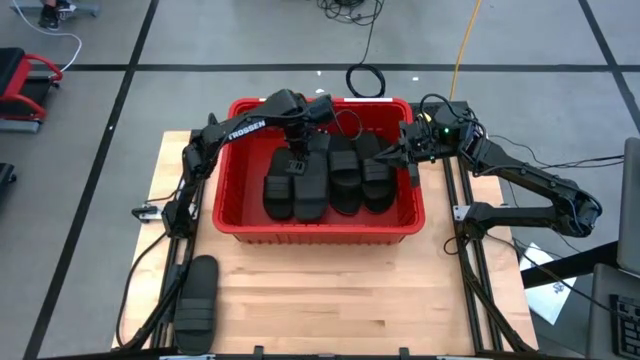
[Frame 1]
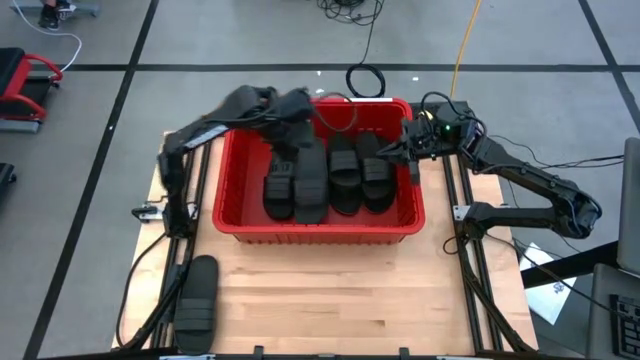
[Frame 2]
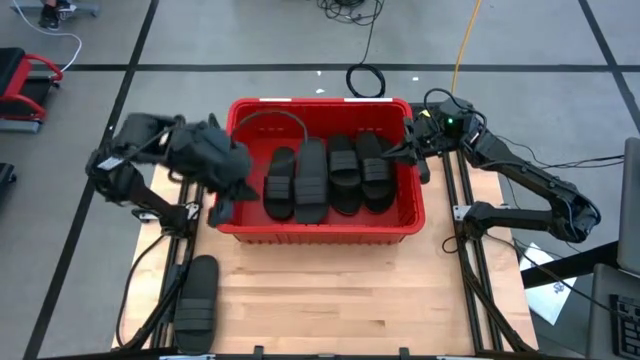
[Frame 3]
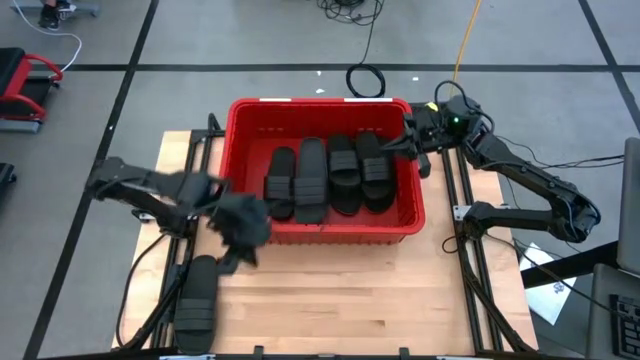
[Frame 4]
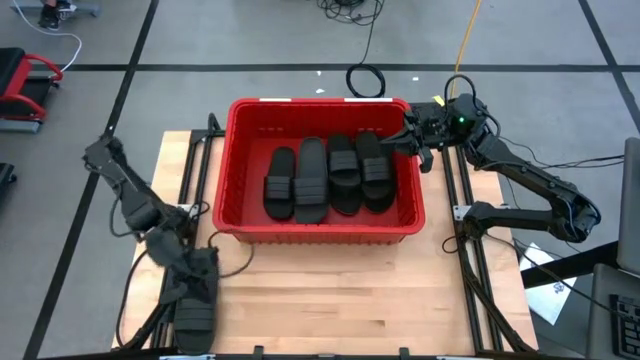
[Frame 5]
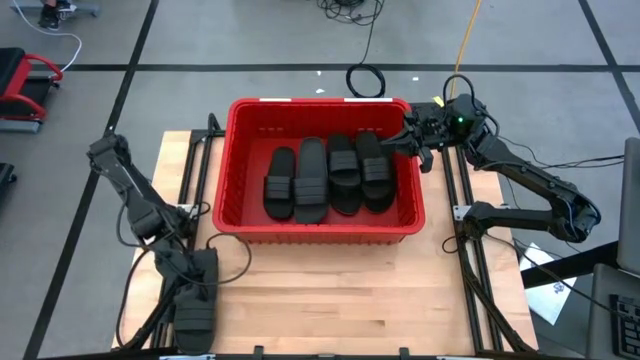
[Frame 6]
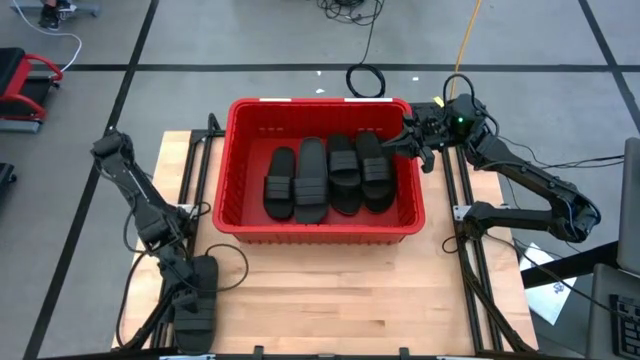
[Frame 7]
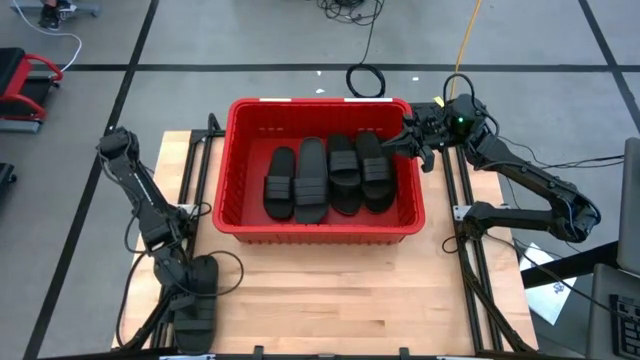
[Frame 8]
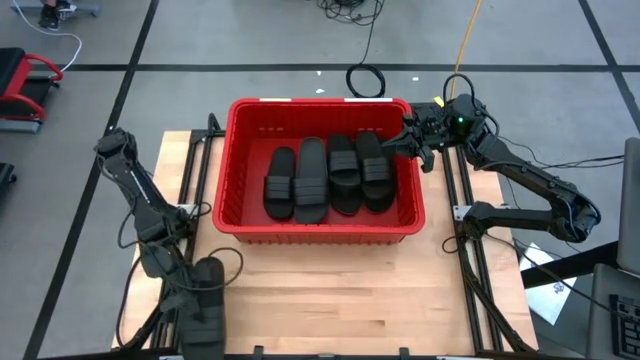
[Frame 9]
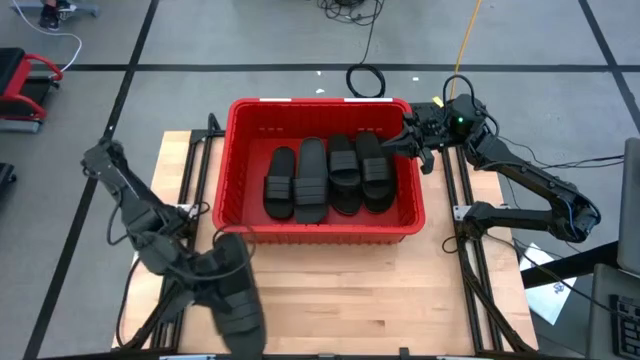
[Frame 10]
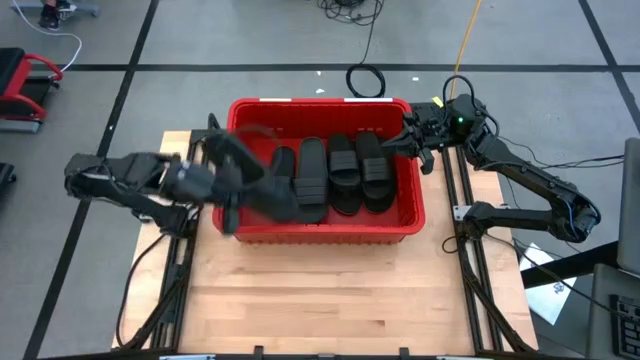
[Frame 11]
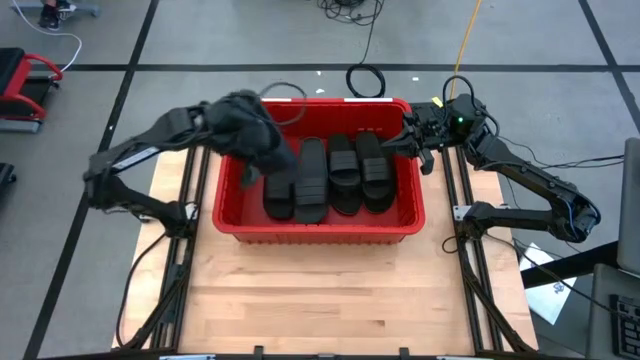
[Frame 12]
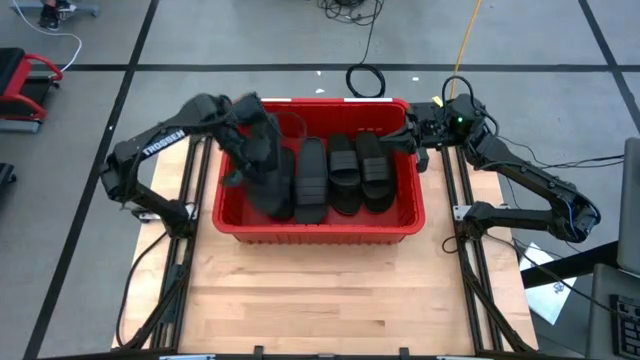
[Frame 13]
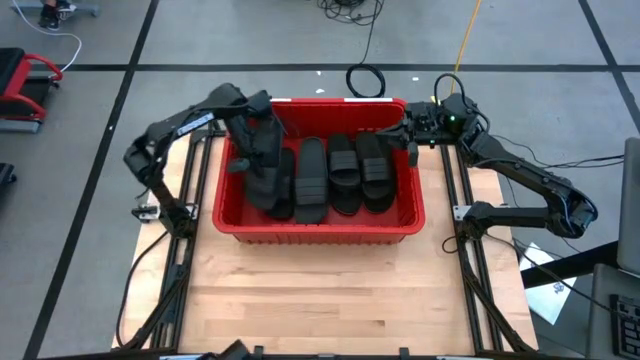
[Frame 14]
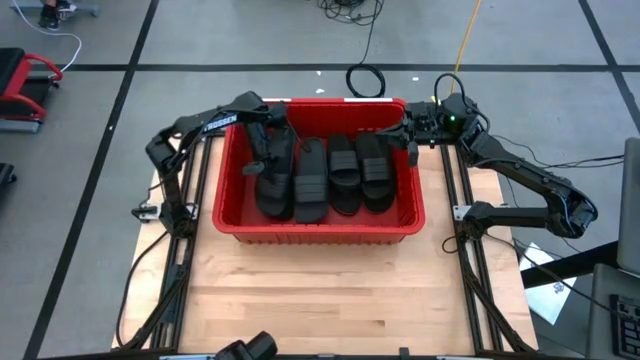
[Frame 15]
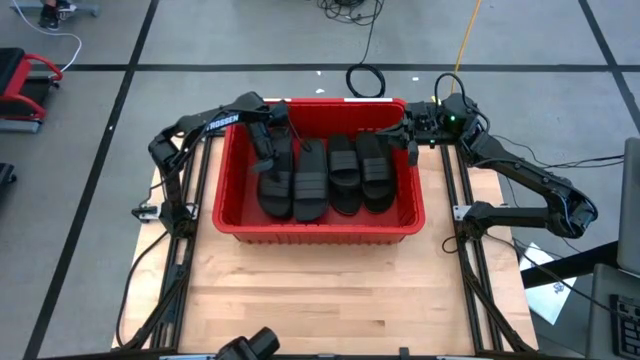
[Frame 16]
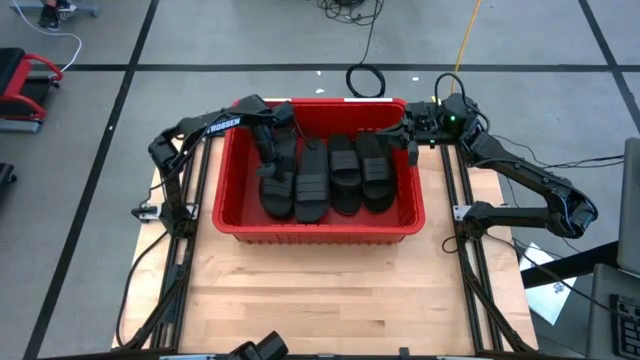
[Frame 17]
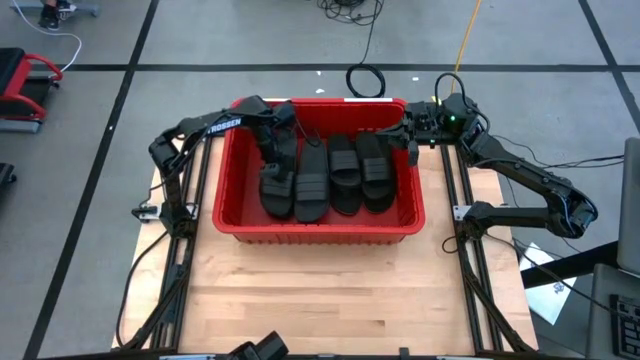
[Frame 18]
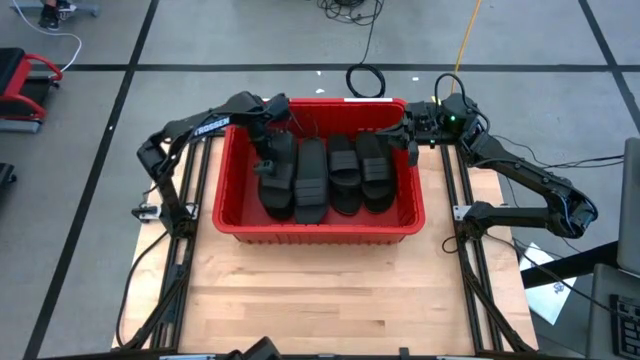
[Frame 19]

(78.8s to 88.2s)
Task: Pick and place slides into bin
Put the slide into the red bin

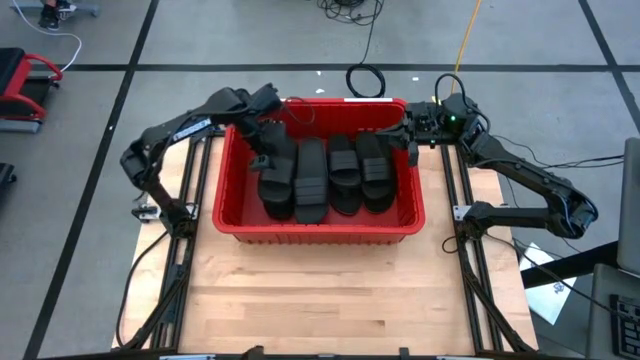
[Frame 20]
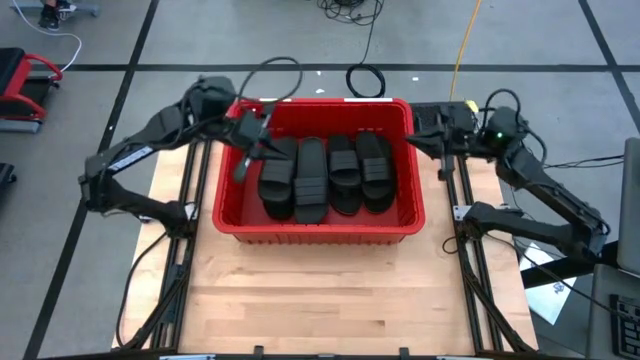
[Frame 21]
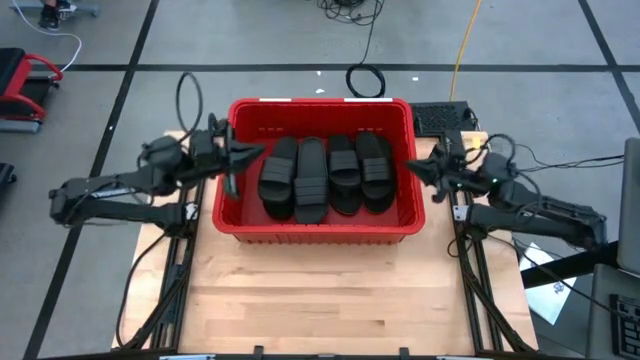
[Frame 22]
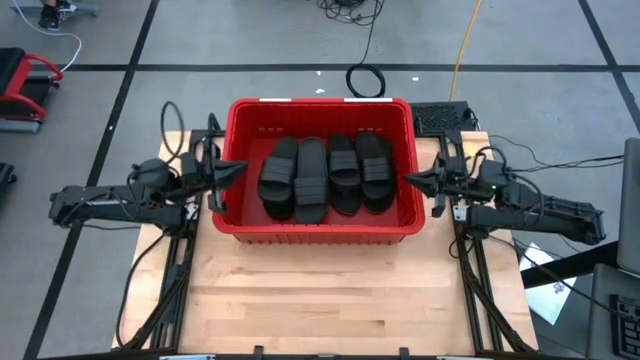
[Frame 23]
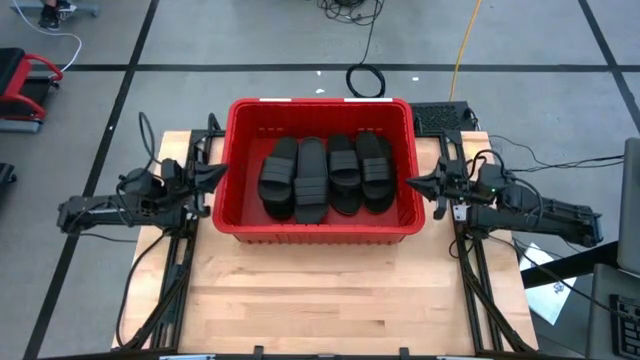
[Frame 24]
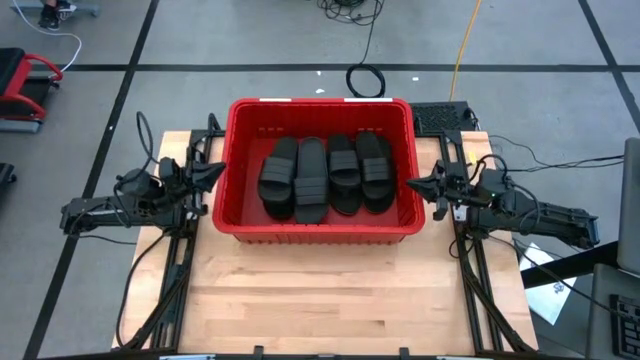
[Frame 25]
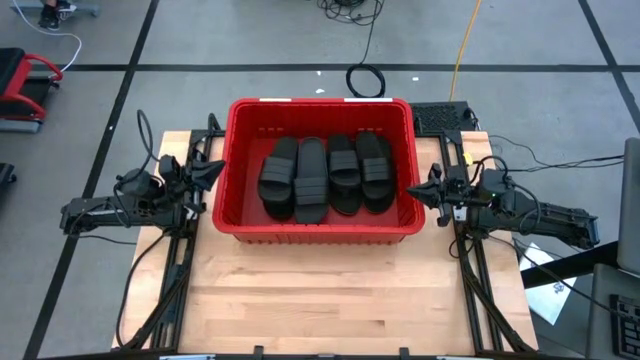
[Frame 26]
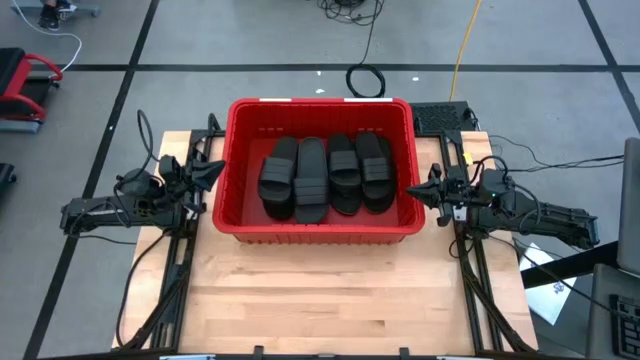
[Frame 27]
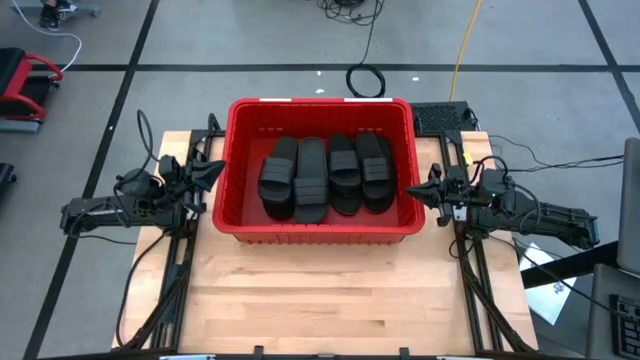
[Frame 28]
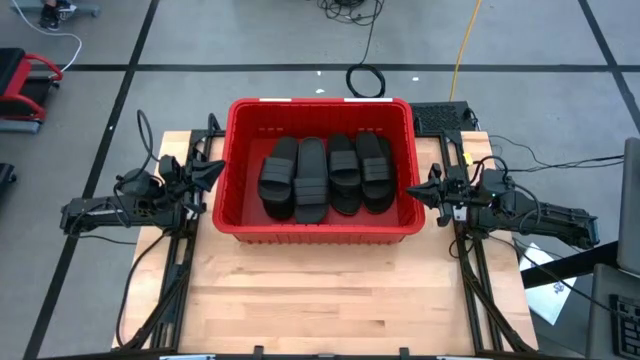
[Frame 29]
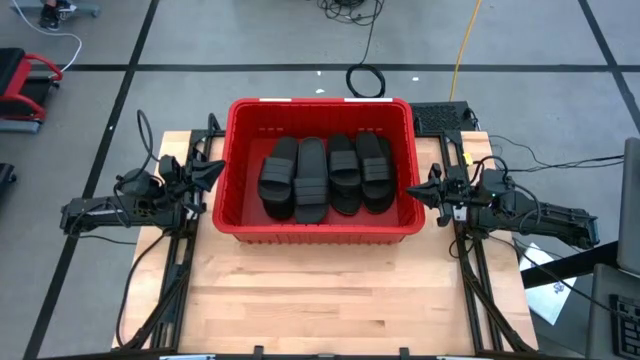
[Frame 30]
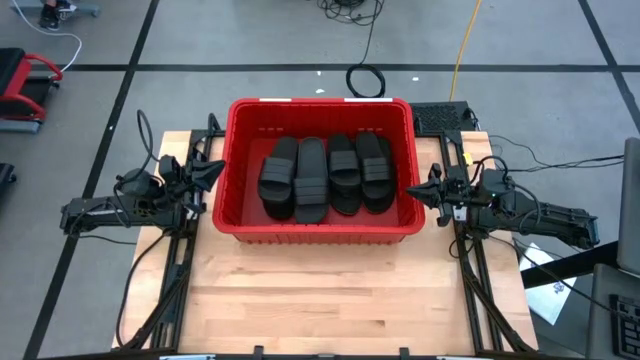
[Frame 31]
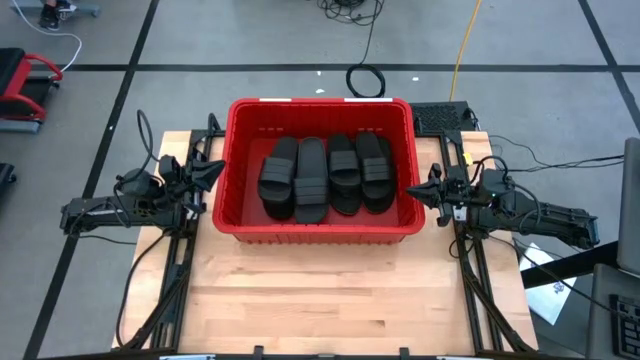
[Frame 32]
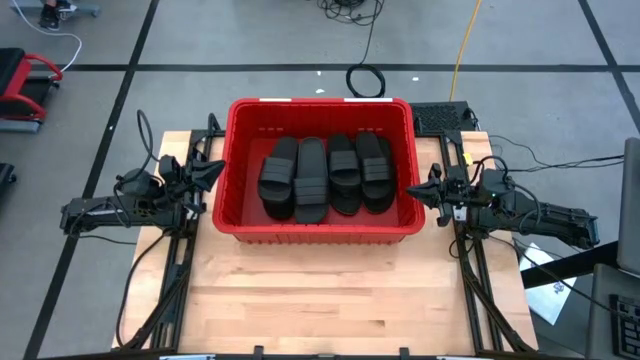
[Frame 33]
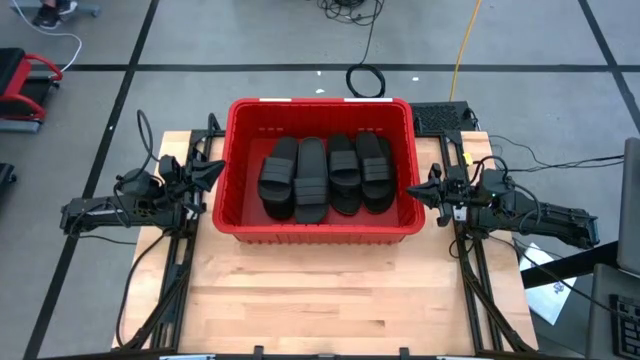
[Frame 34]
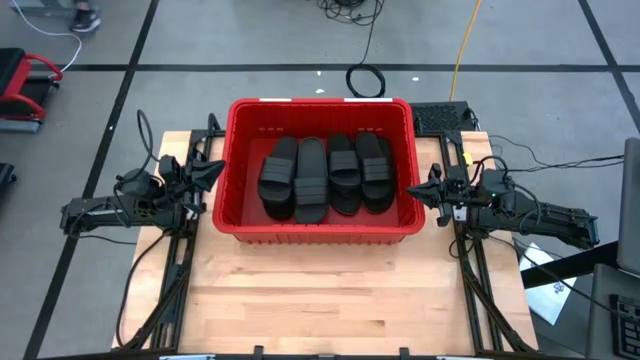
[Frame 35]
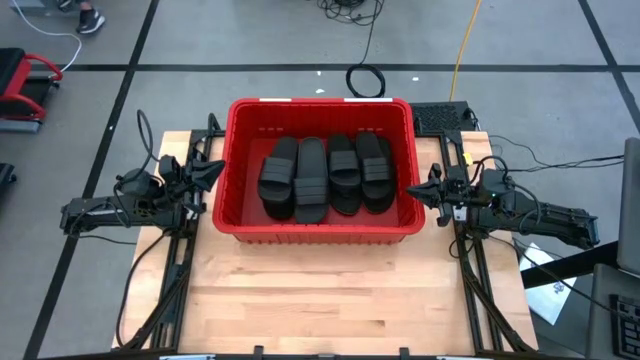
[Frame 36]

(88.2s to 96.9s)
Return to Home Position

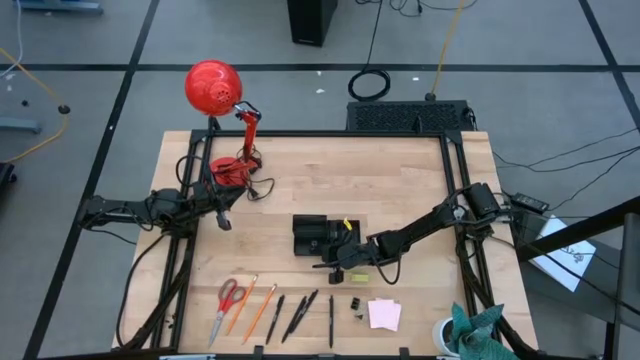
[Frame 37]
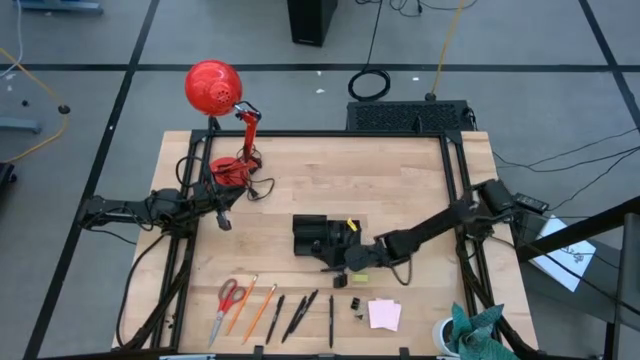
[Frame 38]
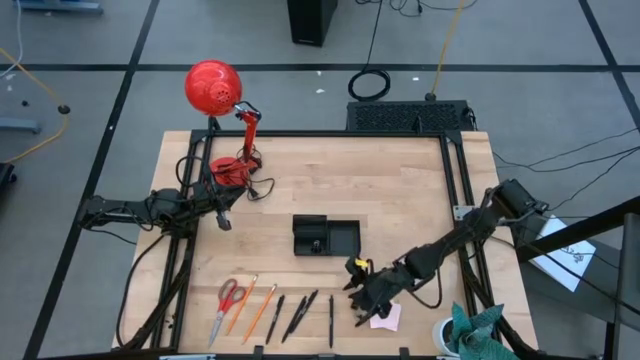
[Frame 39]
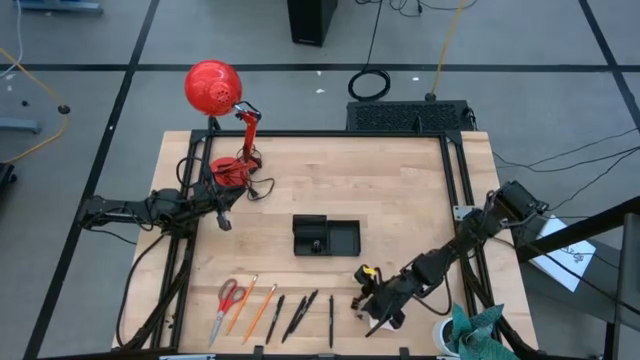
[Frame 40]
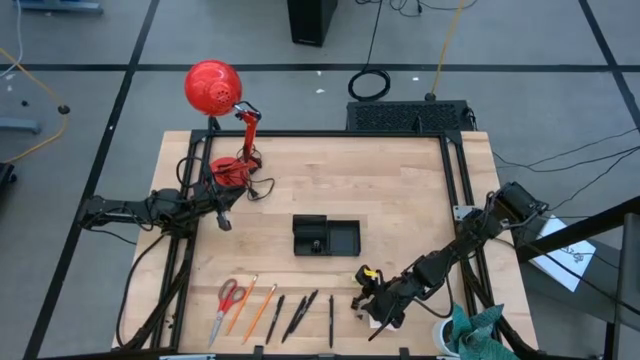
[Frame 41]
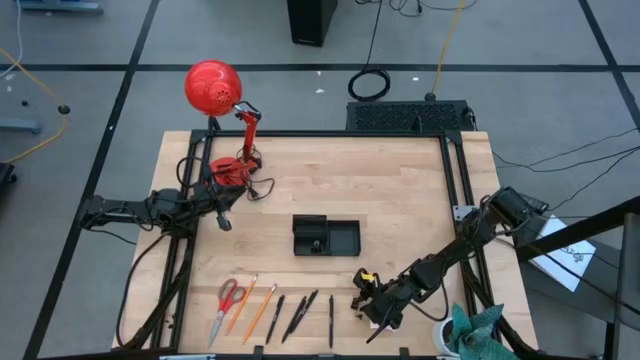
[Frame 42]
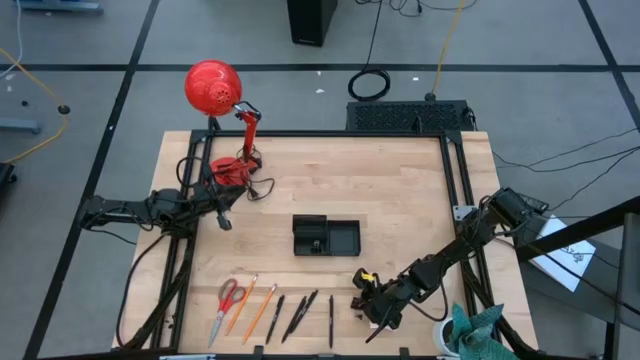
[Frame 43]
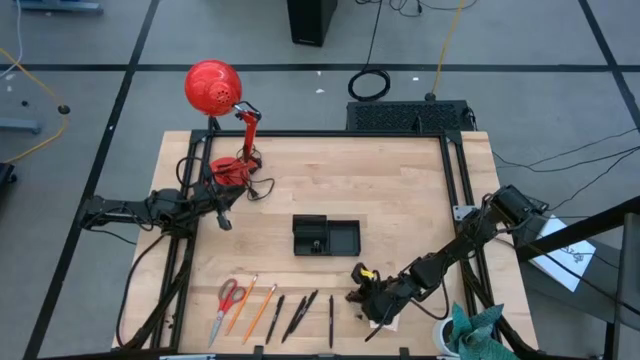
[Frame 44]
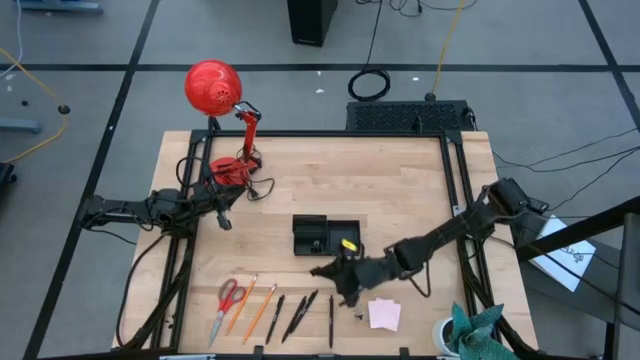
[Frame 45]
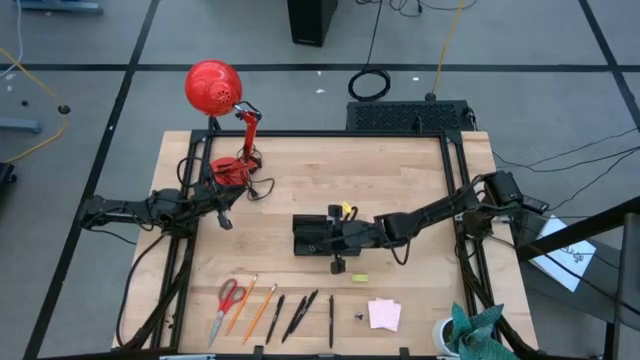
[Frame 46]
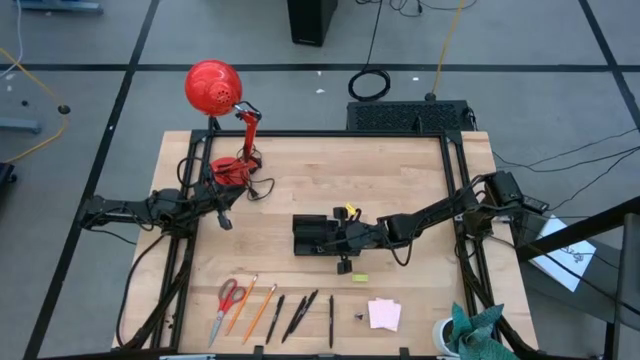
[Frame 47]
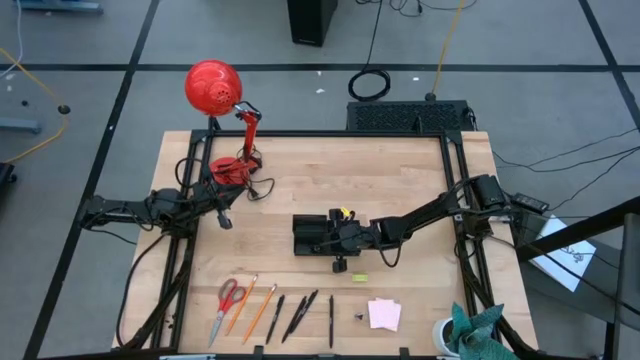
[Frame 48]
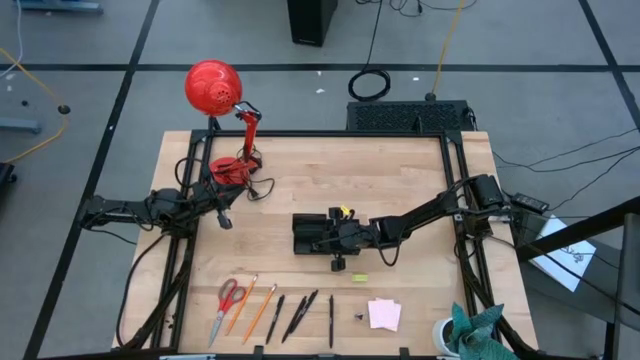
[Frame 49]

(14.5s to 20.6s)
Task: Pick and place office supplies into organizer
Put the top binder clip into the desk organizer
